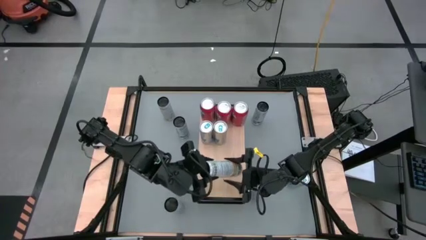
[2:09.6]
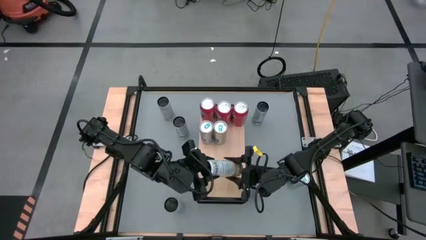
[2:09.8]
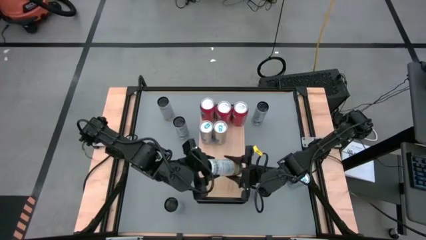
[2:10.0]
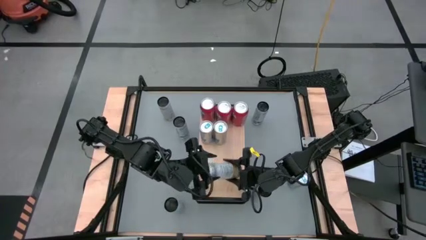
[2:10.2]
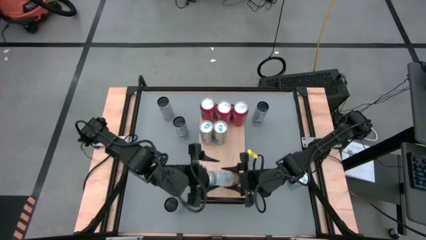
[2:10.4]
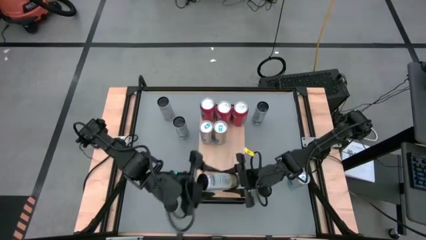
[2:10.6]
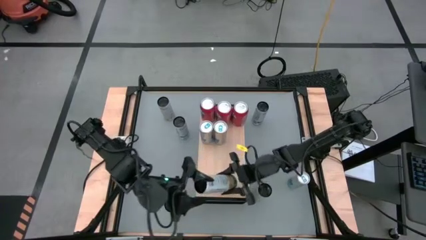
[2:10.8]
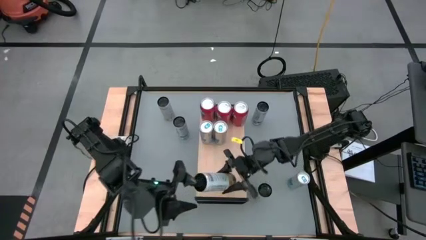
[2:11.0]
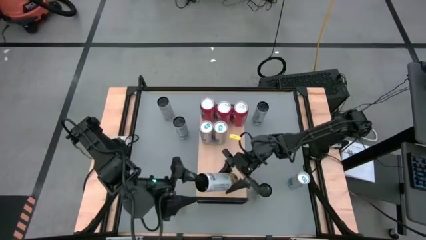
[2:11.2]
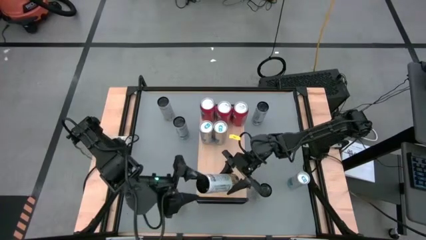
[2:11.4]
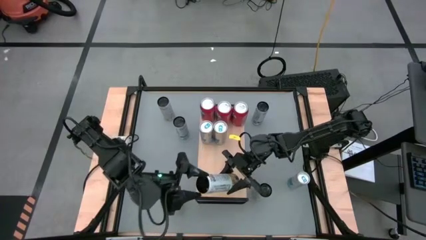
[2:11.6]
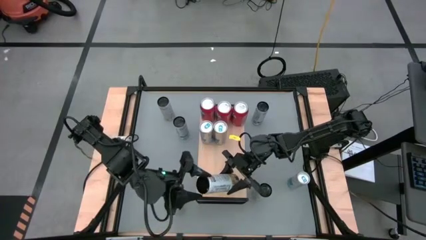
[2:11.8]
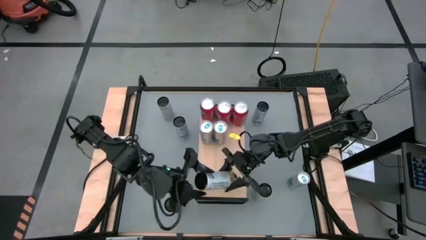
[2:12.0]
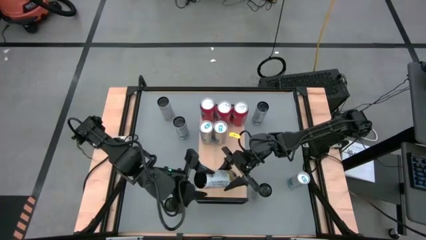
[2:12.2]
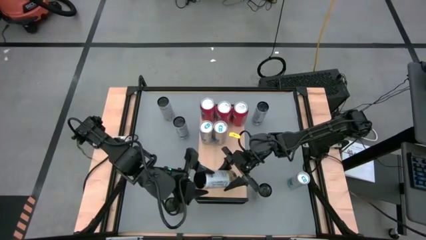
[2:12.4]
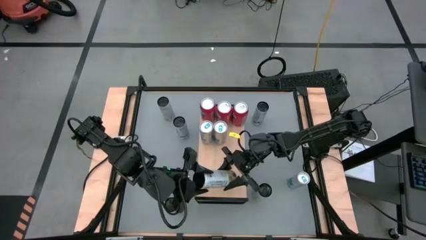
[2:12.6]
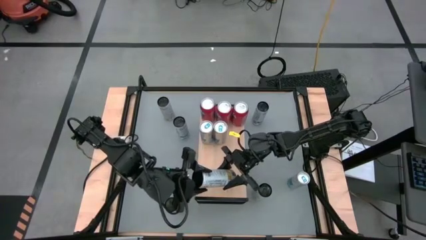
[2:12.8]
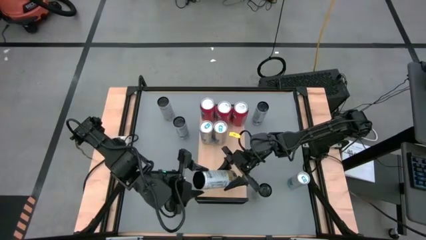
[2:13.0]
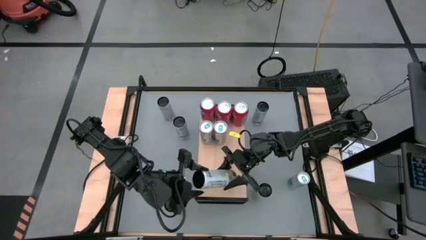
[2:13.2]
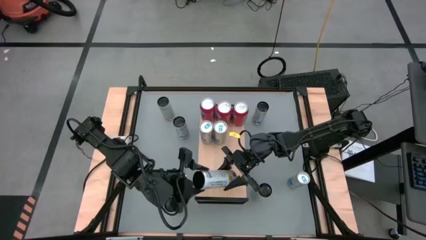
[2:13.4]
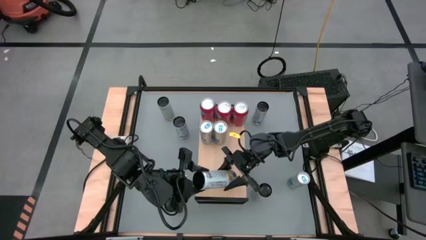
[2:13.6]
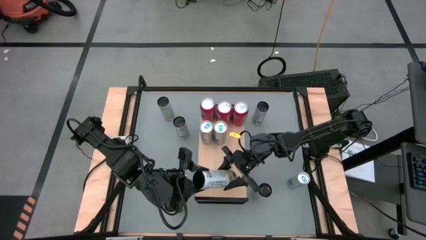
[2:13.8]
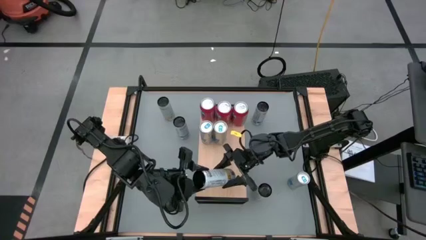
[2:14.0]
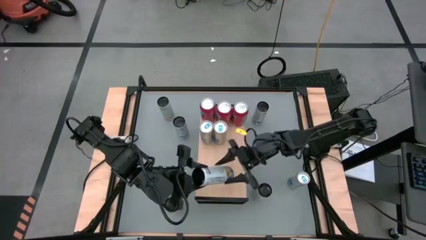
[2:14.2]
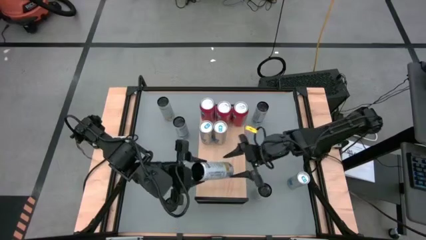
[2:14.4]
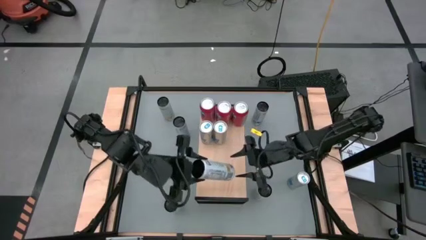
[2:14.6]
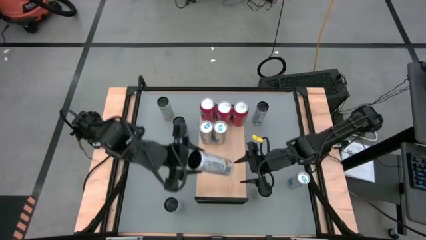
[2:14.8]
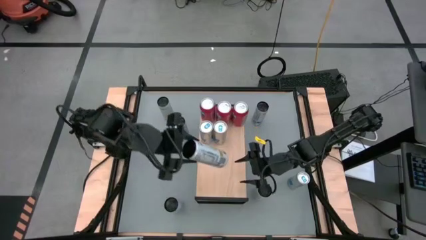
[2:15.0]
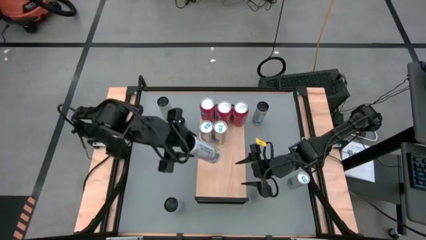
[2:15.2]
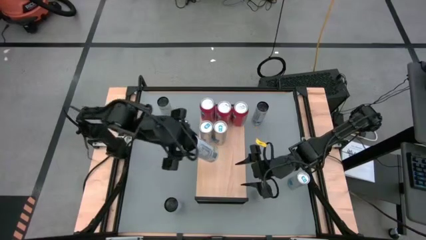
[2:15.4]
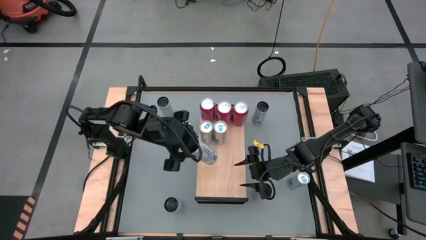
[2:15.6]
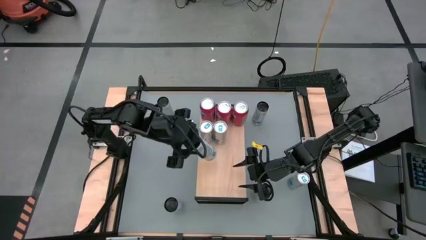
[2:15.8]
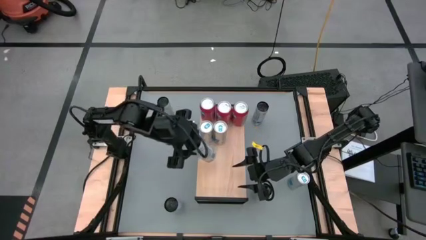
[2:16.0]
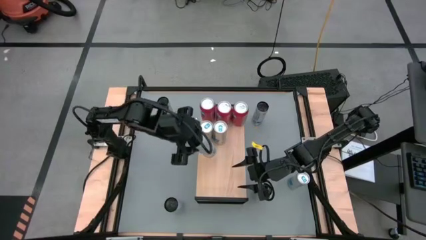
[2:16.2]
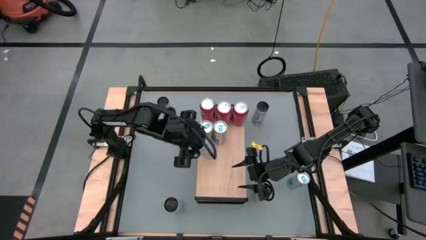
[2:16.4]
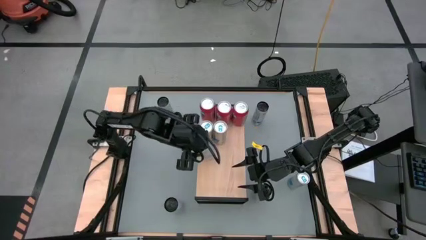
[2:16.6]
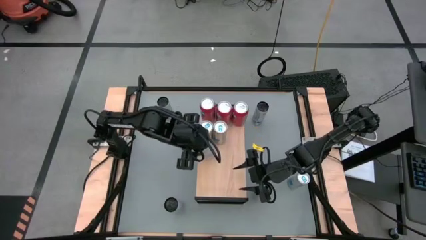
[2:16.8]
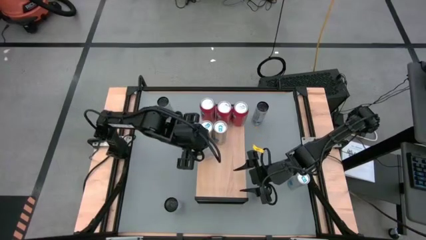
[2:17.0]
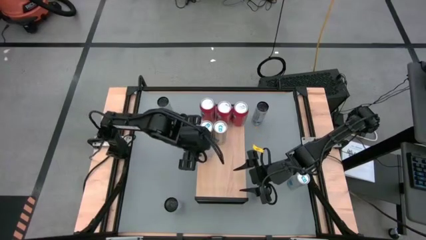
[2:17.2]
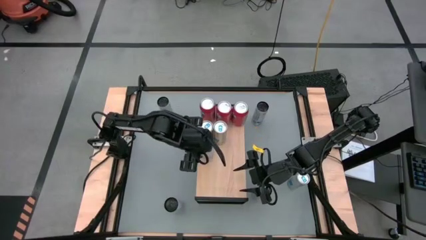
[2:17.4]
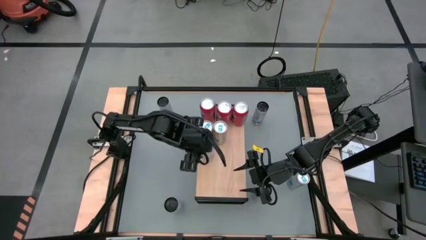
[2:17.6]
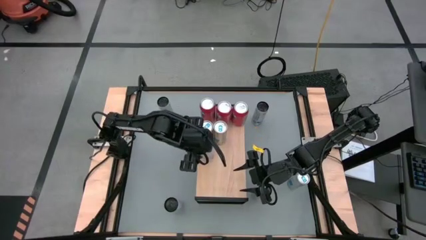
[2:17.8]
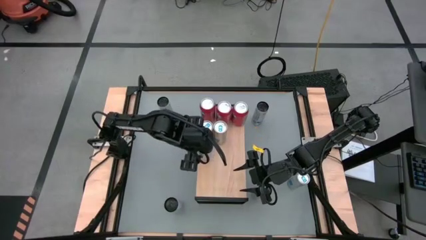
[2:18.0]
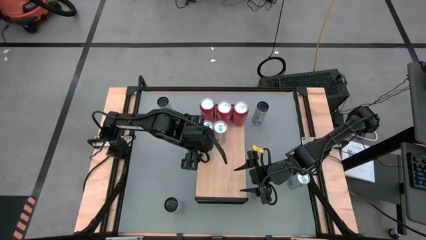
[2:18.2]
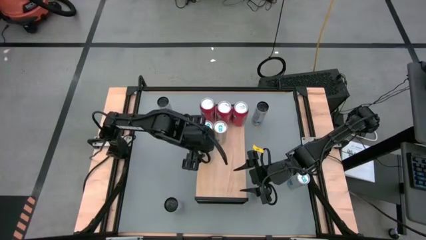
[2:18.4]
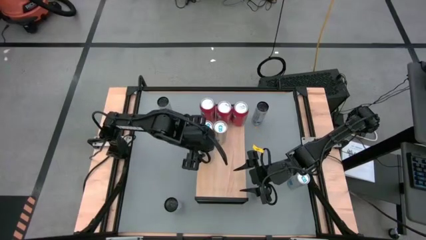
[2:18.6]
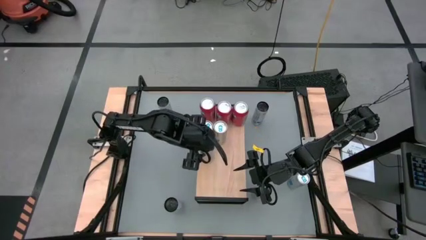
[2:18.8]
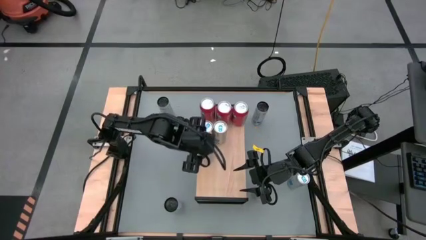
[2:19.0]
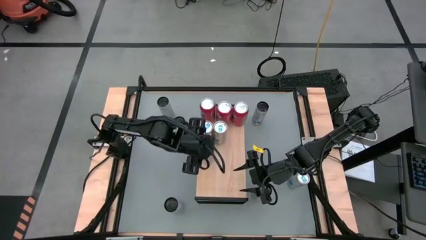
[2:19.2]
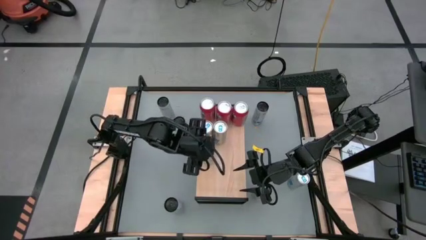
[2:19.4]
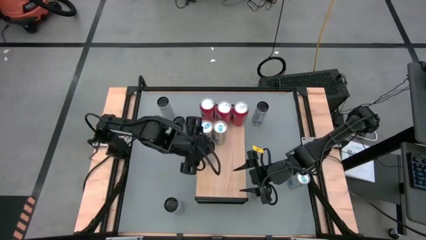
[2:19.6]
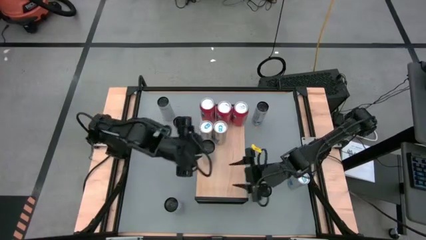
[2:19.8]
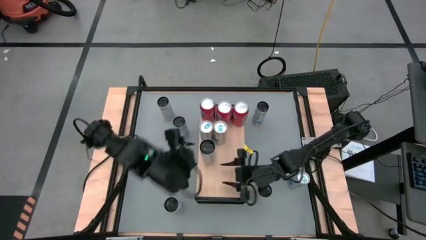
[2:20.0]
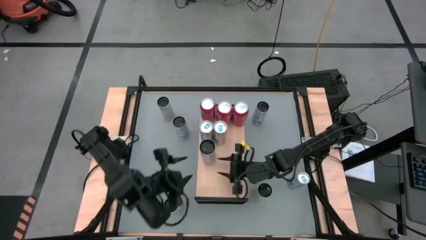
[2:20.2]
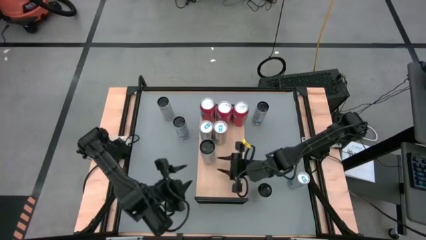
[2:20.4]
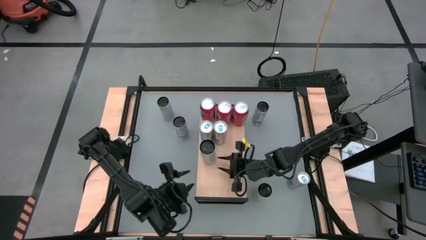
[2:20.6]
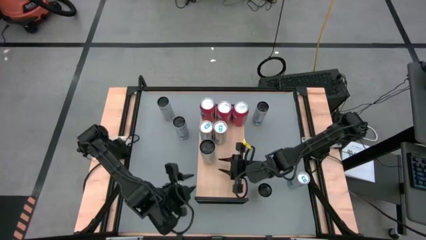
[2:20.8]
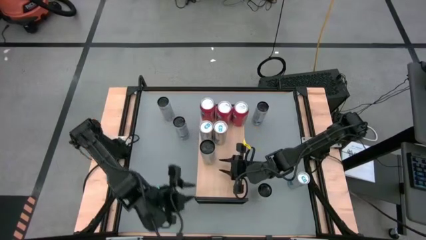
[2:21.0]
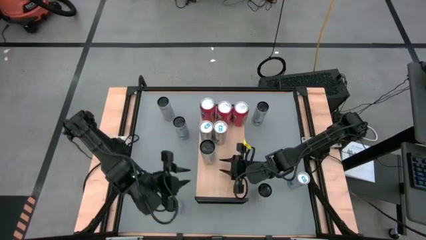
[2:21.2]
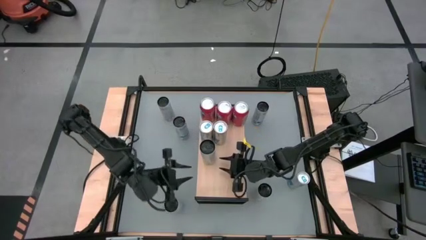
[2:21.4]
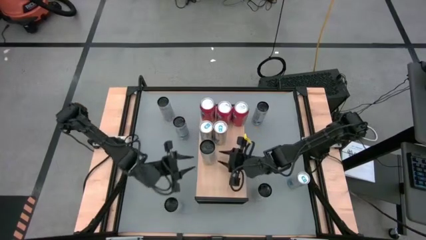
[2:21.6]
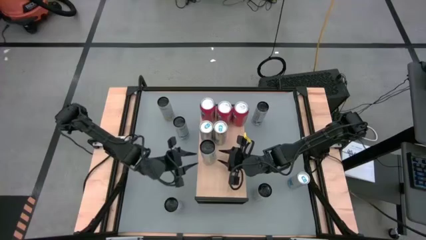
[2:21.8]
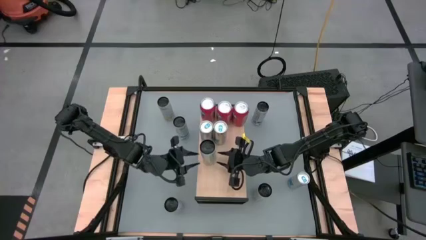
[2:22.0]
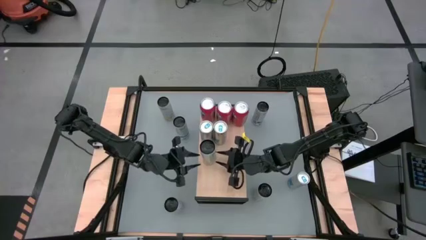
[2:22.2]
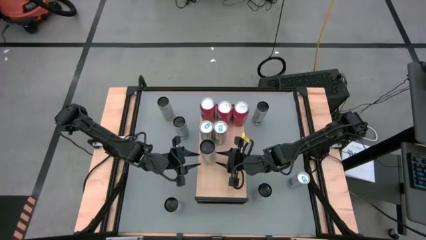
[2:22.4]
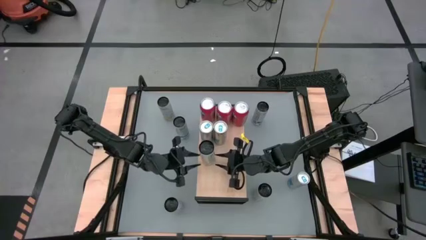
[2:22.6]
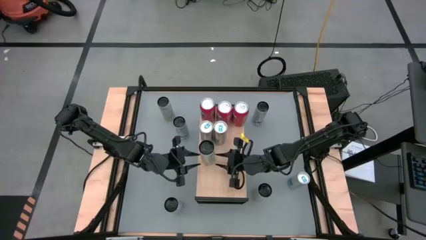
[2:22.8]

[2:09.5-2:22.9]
Task: Place canned beverage on shelf
Put the bottom left white soda can on the shelf aligned with the other blue soda can
